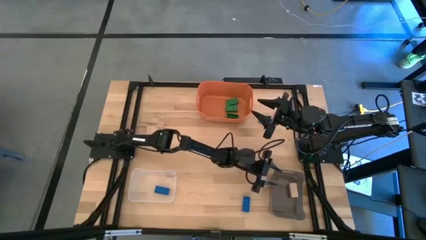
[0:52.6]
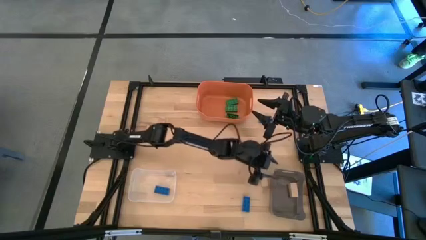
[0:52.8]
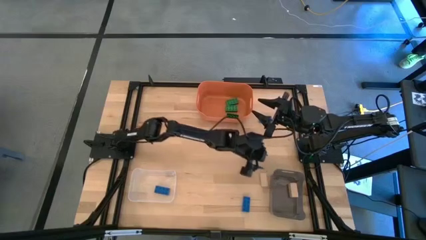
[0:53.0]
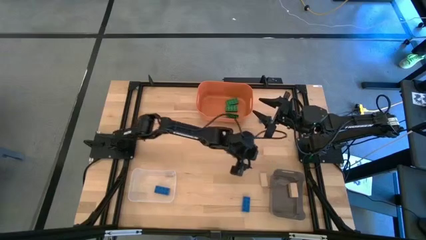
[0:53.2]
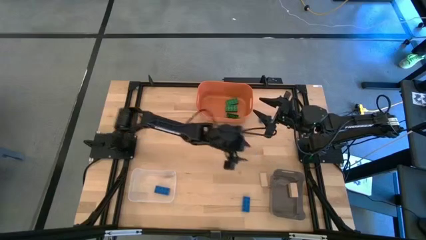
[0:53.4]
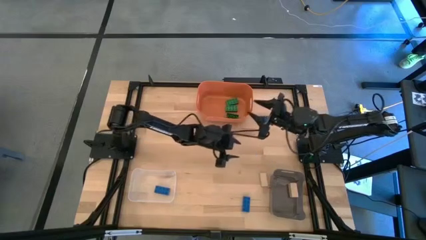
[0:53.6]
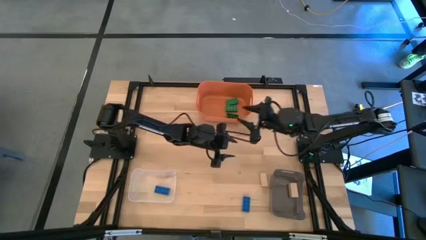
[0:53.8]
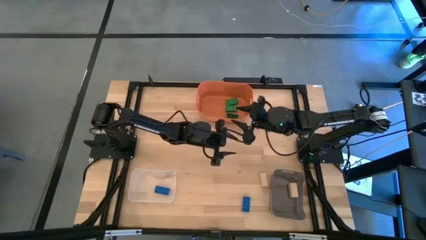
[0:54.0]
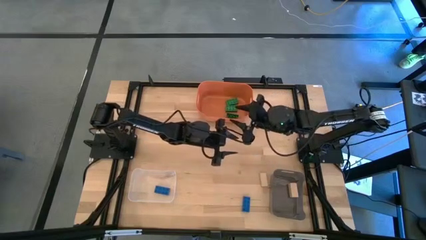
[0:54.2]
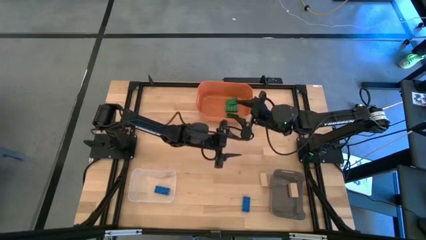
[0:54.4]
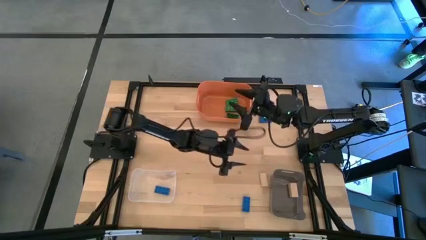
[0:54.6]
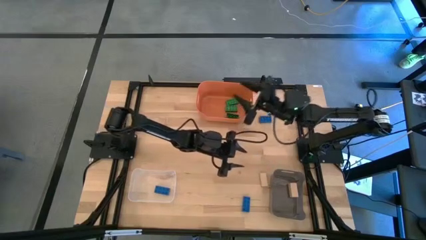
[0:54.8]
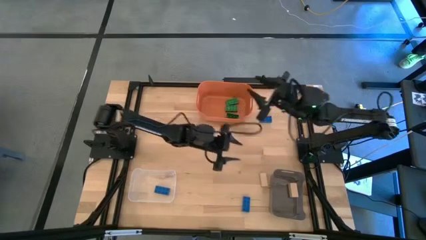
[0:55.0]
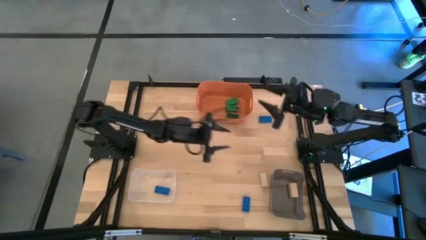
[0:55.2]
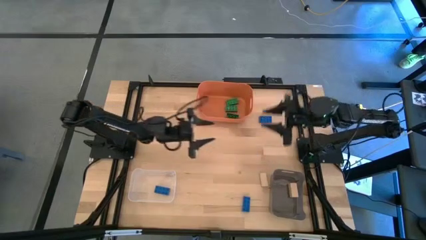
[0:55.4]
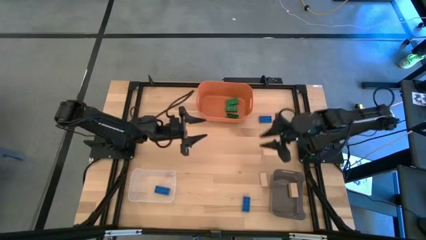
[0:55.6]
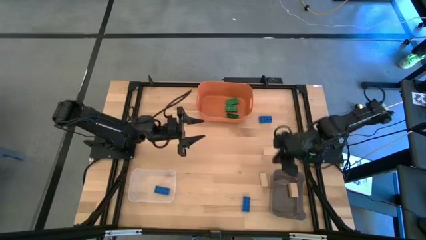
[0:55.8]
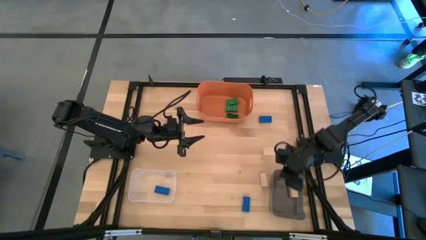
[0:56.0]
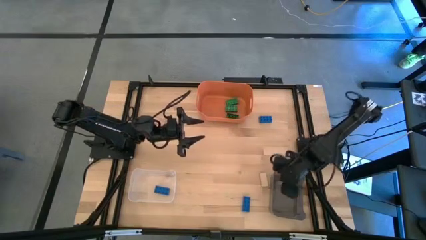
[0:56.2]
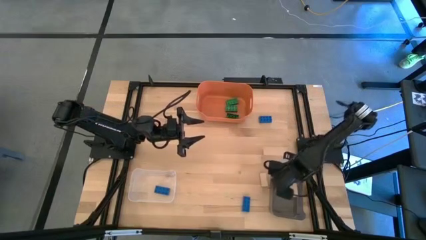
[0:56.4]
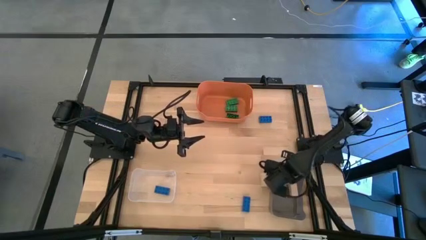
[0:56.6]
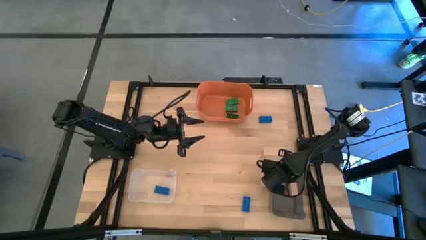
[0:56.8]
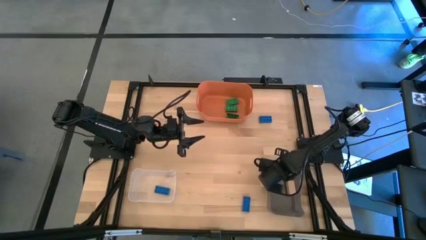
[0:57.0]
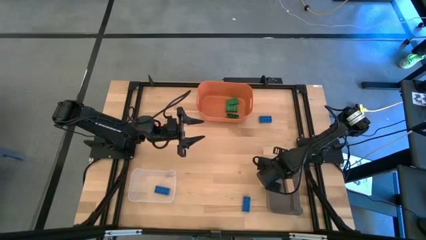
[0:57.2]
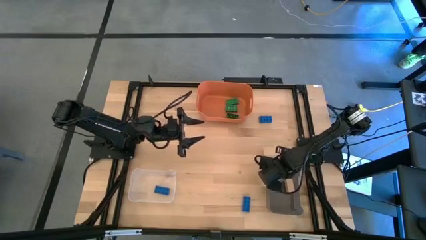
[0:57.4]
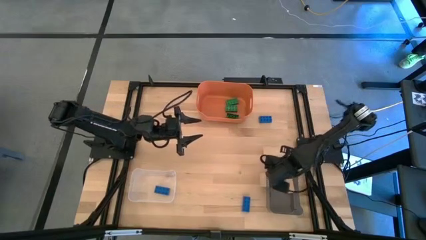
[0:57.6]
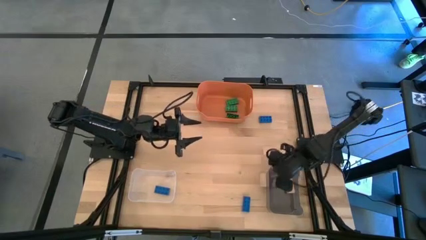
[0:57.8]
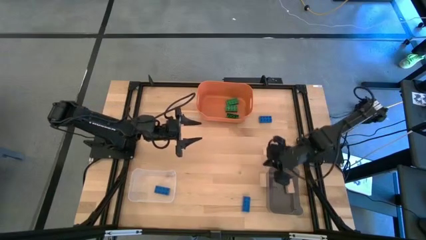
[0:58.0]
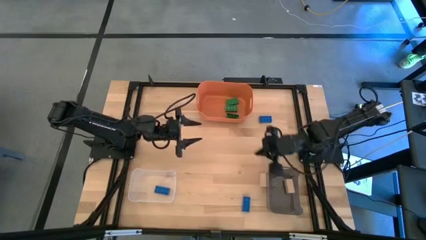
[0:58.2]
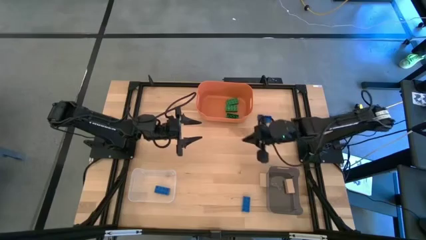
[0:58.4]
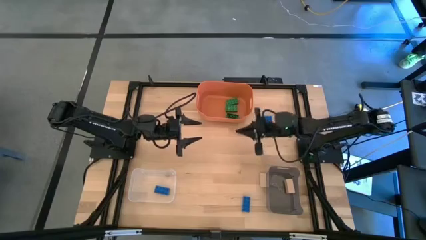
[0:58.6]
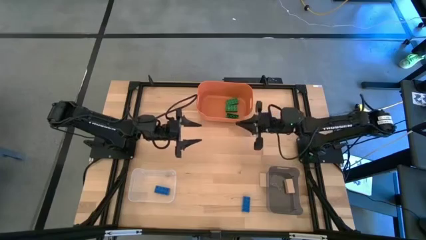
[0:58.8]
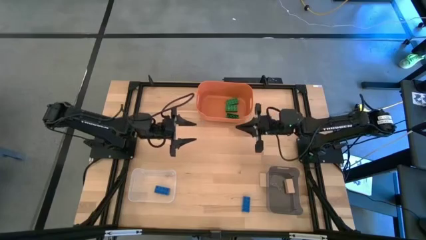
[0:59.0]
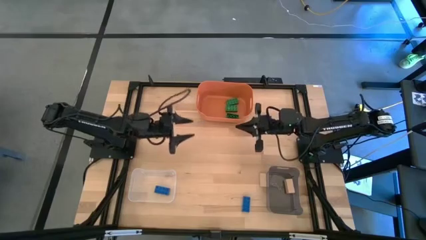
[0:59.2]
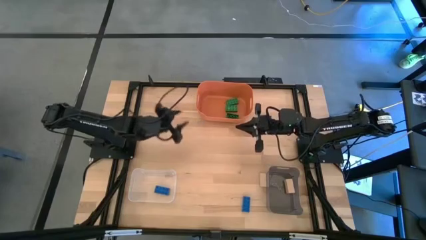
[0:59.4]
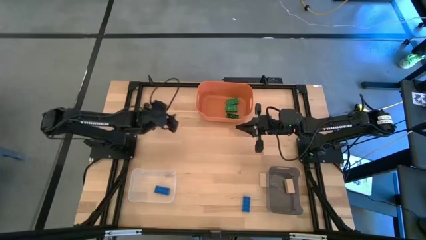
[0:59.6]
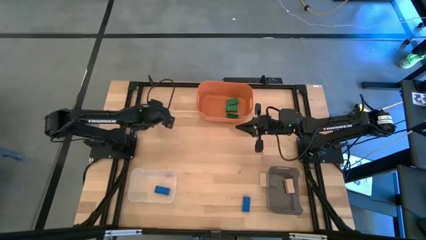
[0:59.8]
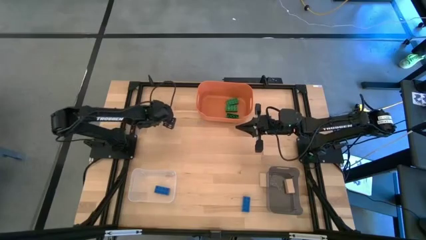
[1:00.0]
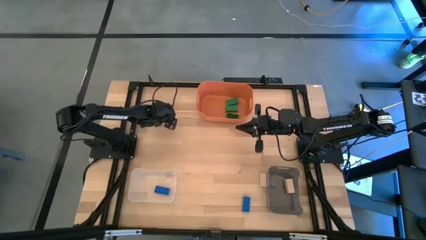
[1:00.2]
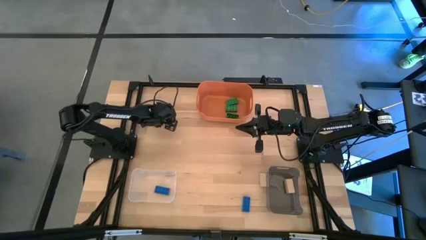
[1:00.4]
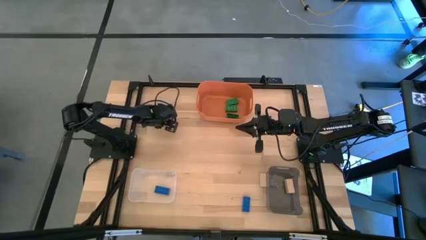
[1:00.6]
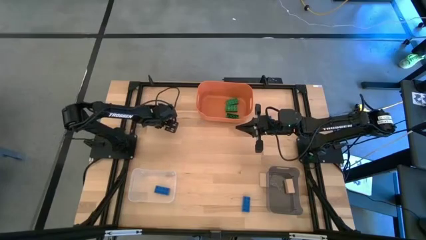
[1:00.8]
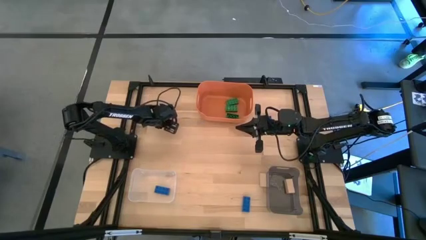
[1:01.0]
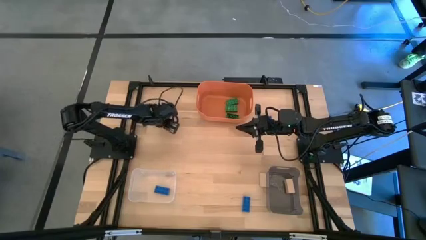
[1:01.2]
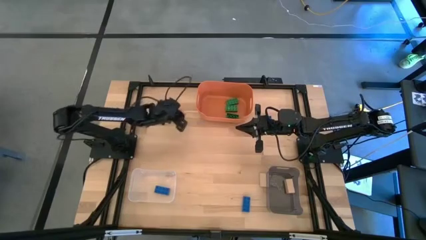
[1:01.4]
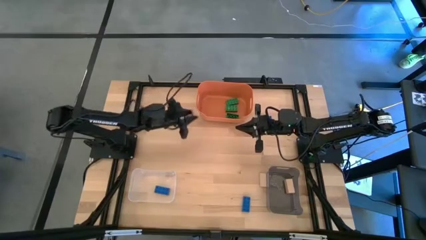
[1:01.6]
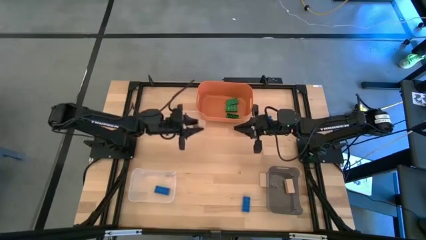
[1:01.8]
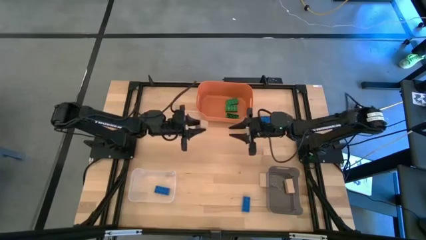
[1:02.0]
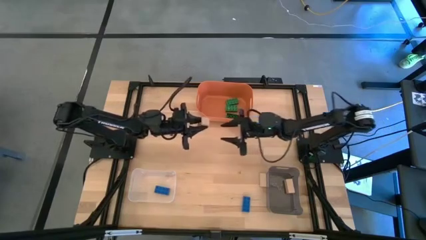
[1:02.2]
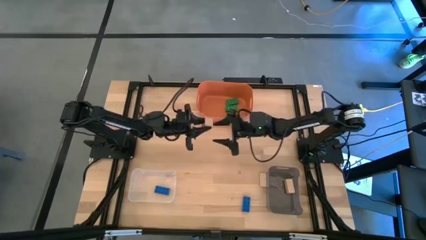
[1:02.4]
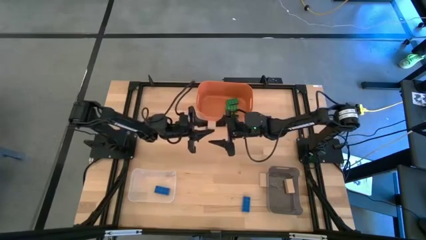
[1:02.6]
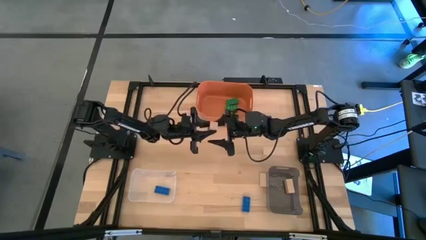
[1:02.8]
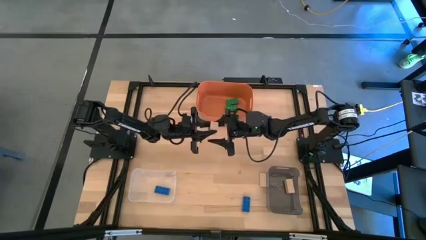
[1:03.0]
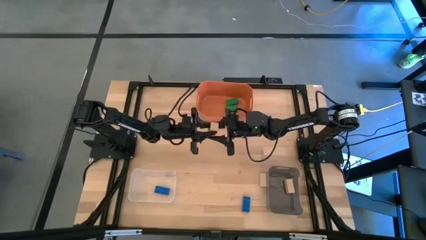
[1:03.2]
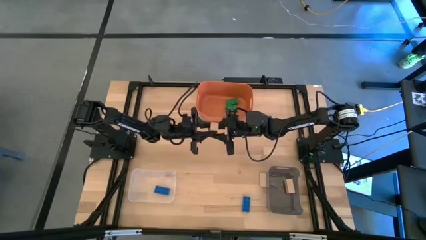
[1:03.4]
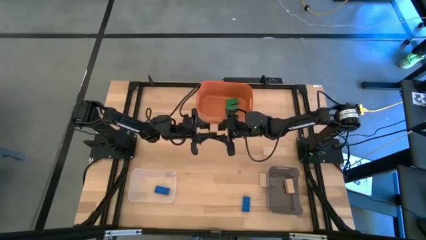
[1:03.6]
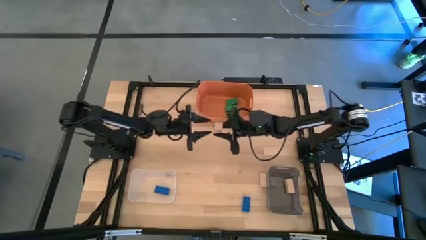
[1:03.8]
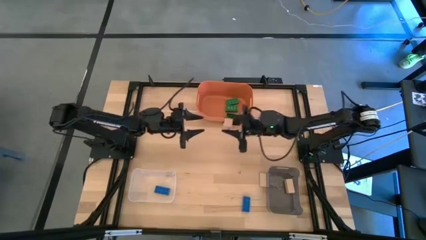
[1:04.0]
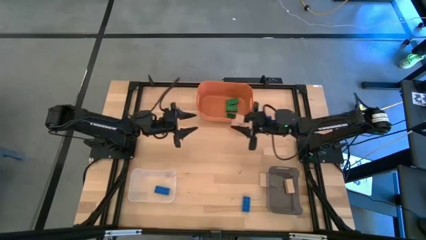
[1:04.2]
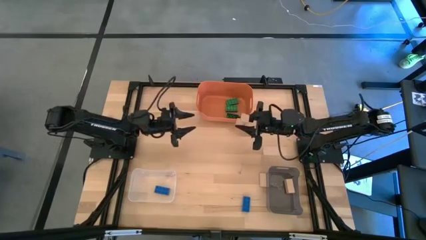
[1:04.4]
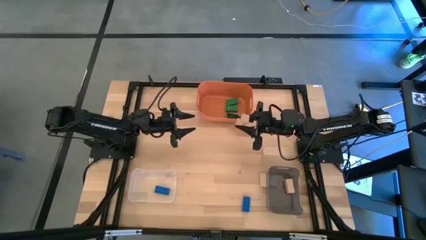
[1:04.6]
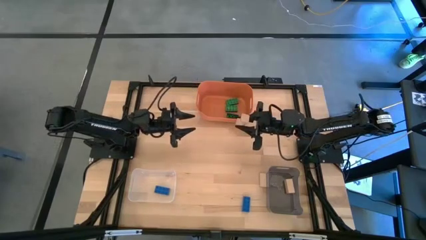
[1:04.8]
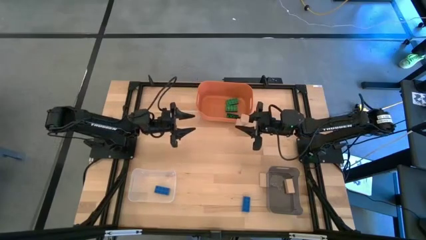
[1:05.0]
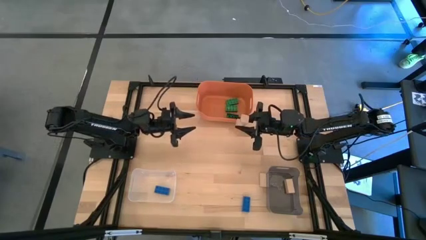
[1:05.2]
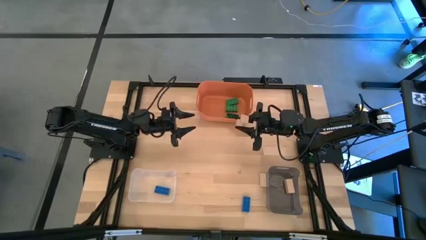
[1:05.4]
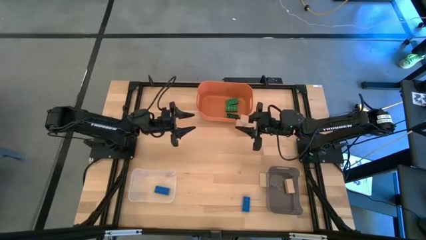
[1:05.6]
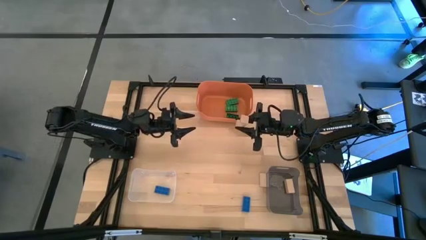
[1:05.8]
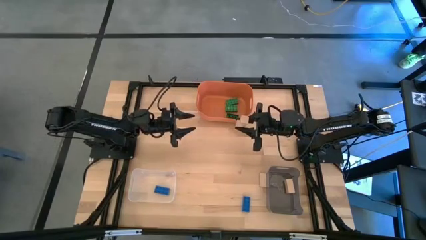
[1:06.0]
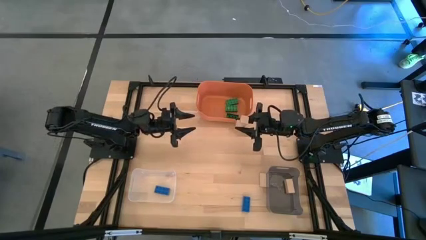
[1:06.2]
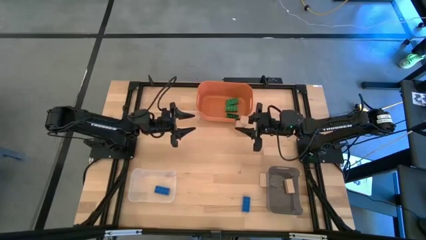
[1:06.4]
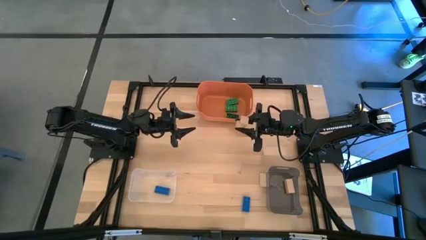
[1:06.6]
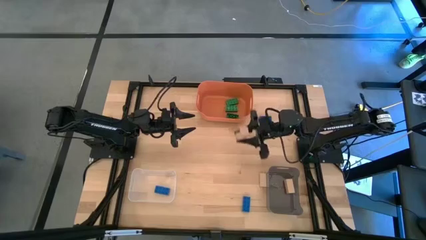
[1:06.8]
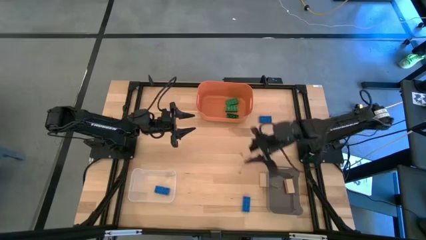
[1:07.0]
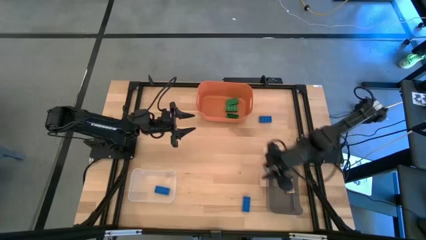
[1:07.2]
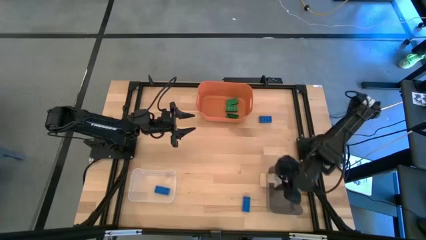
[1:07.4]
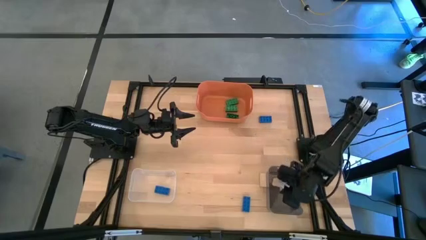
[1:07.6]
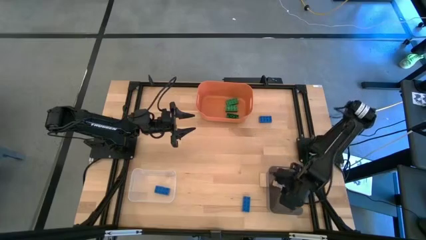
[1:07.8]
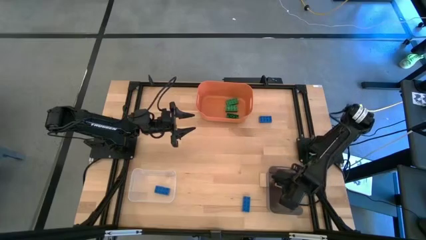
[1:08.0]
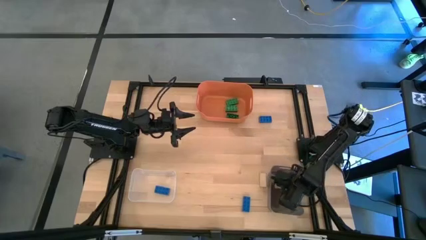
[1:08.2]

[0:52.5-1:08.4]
Task: Sort & place blocks by color
Put the top brown block into the black transparent bin
